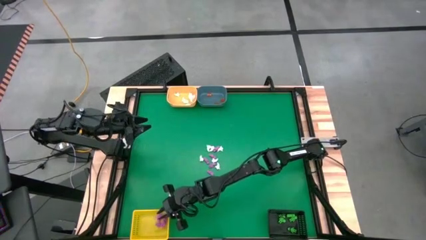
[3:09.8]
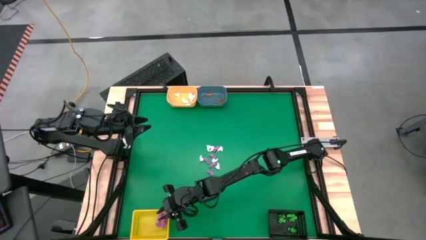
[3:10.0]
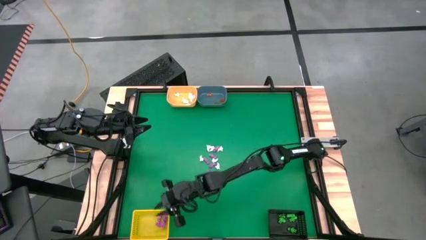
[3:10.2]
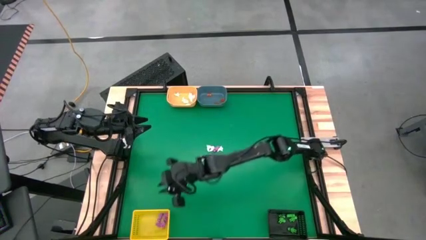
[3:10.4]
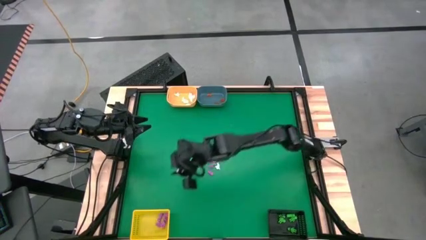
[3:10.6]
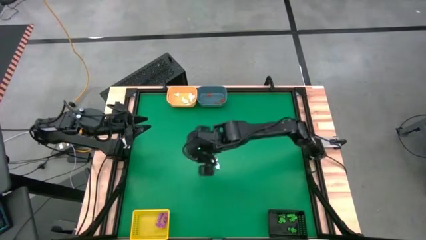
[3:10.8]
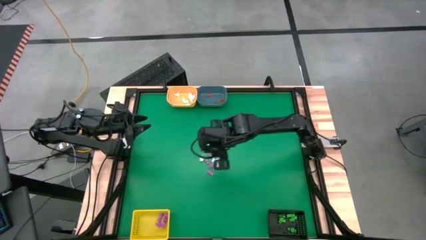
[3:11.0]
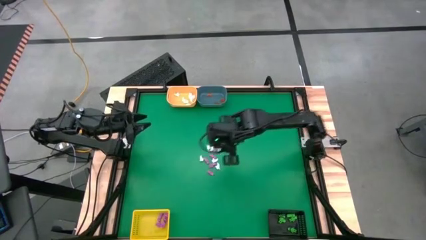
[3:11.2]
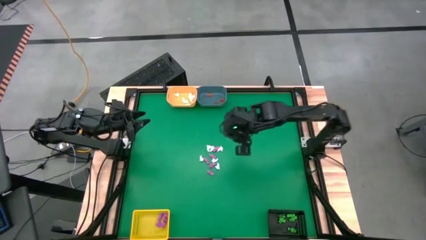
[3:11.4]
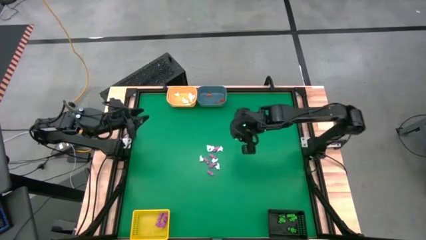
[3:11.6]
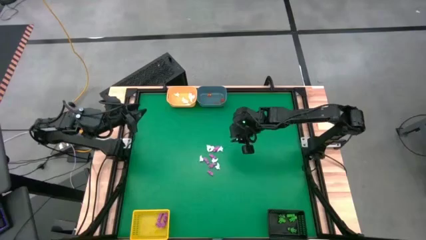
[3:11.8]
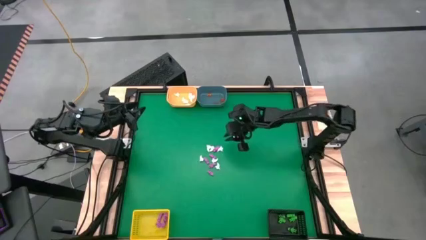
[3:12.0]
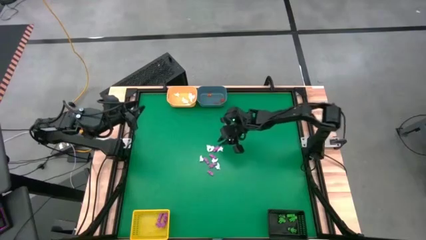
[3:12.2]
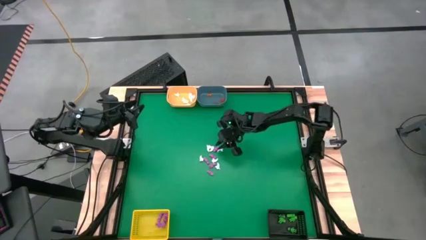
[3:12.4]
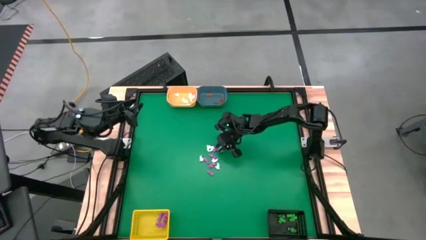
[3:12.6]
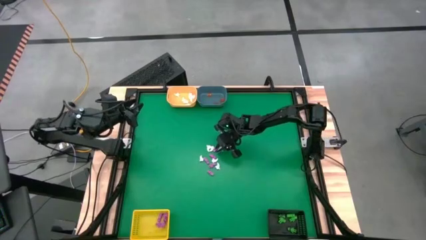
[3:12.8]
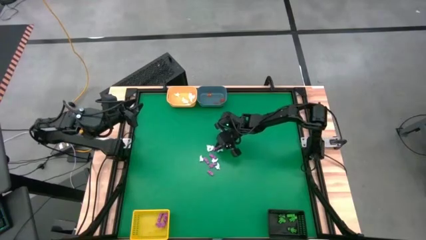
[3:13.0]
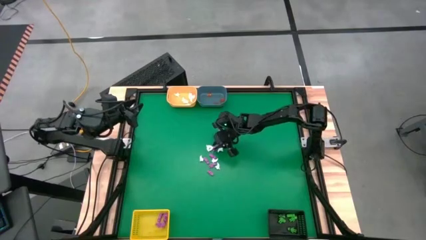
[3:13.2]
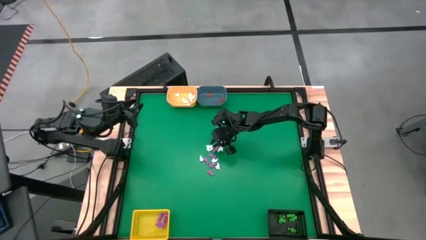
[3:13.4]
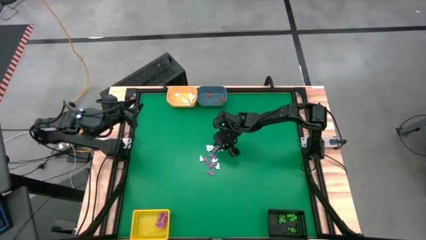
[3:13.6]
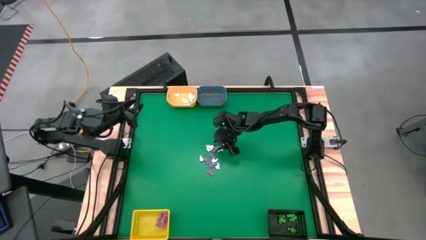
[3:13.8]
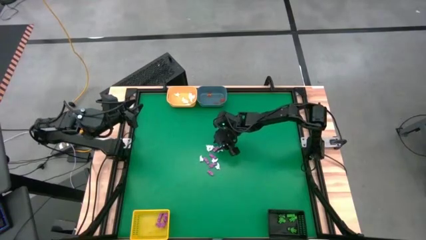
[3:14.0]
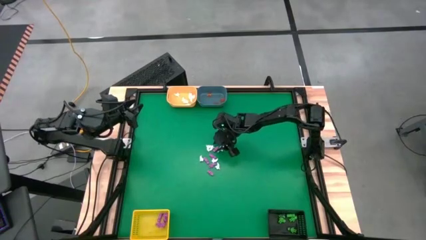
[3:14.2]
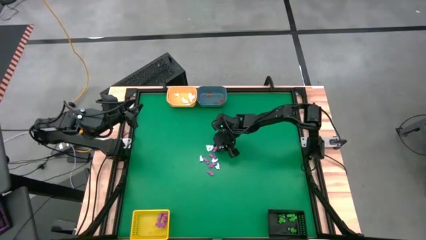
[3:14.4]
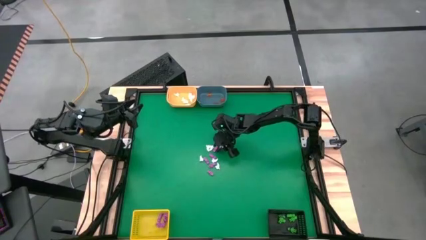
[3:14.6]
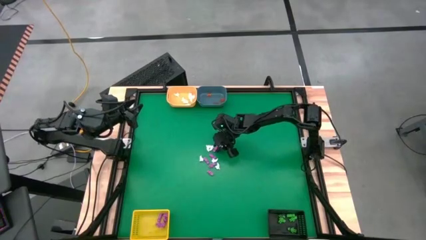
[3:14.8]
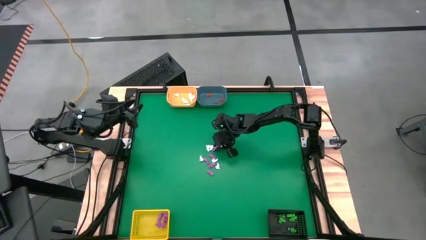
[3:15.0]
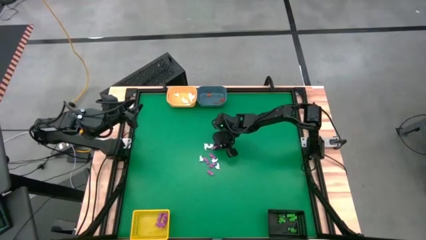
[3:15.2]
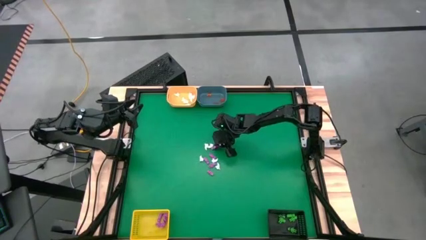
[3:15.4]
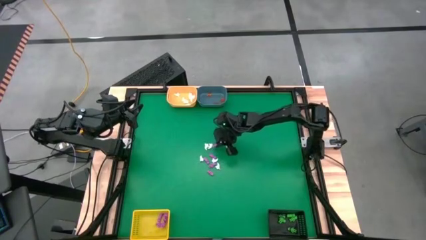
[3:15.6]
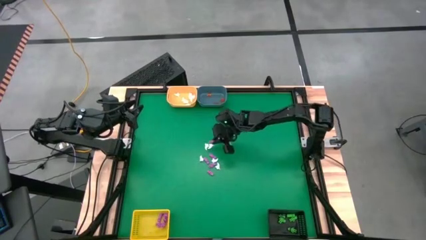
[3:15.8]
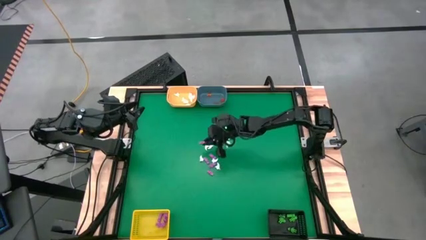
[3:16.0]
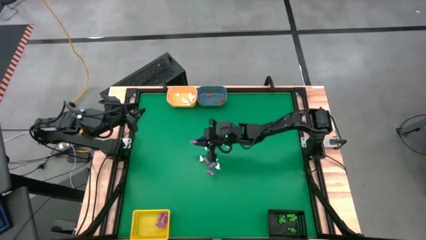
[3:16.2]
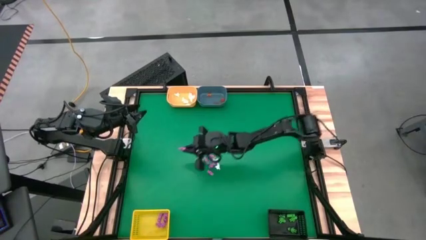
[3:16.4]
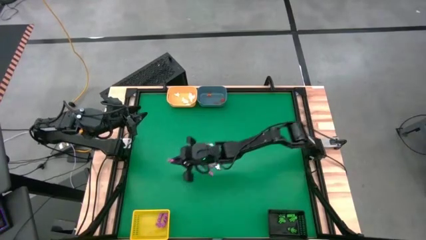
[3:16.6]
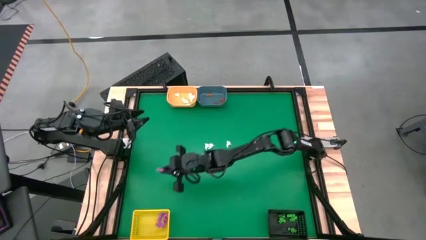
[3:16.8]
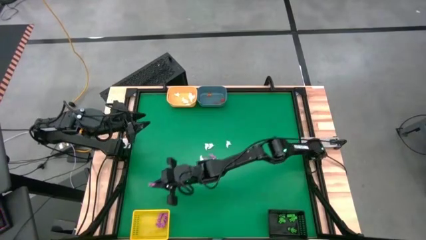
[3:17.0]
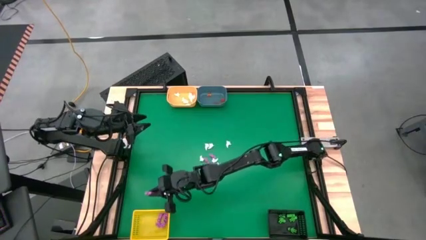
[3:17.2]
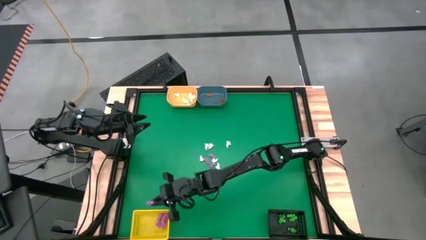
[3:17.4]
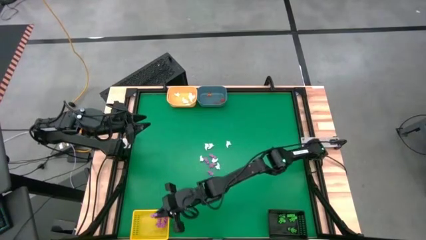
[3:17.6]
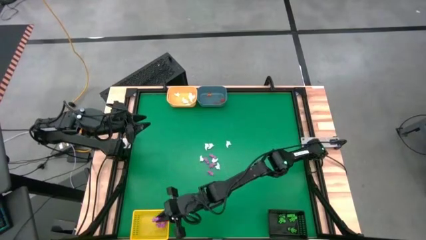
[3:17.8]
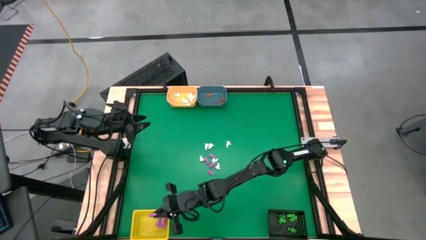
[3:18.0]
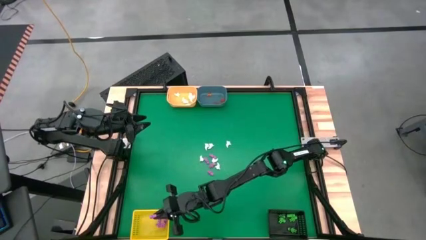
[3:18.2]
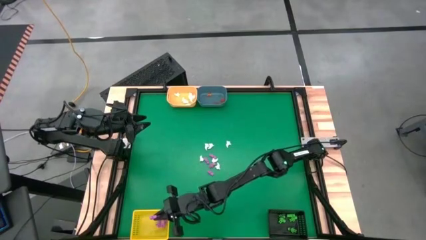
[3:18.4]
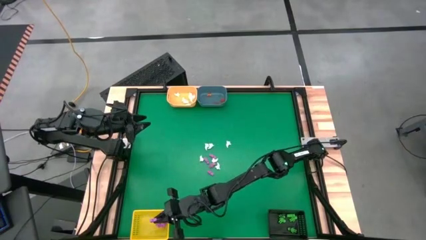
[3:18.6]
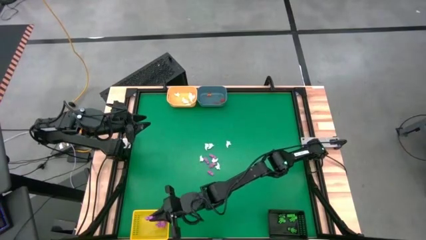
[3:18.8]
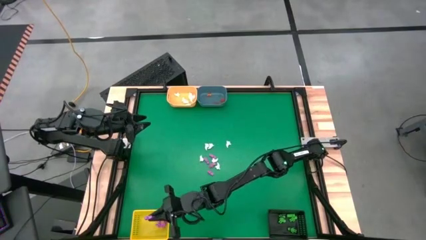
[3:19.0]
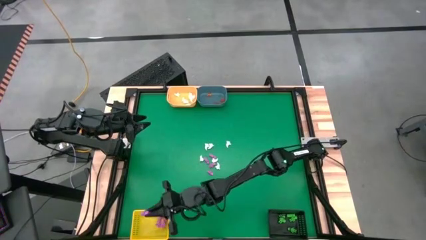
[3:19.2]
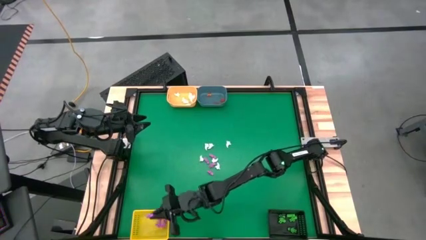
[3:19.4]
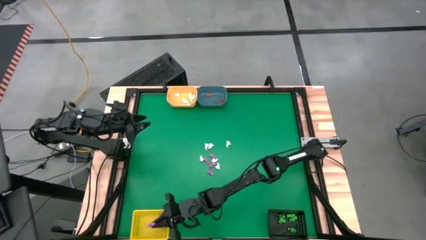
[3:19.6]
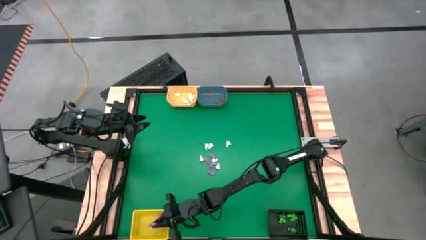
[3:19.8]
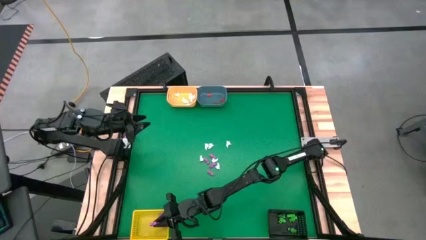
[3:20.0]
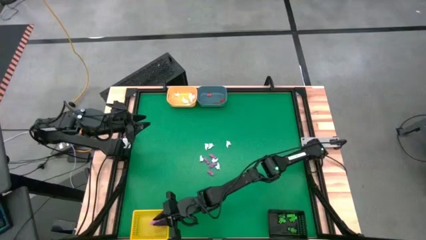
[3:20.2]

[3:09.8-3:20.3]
Task: Sort Halloween decoration
Put the pink skeleton into the yellow bin

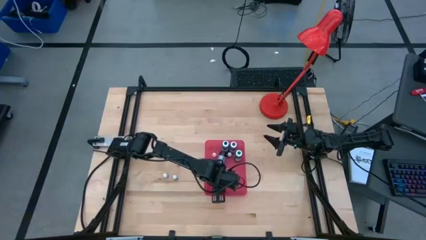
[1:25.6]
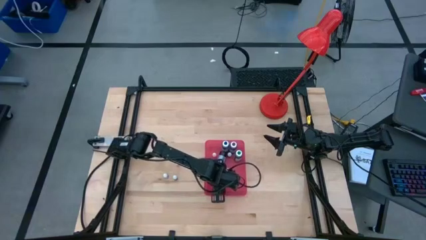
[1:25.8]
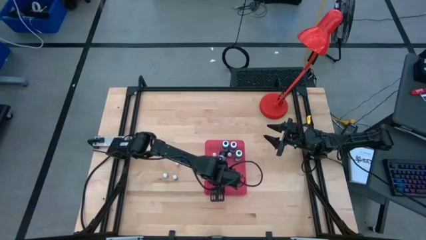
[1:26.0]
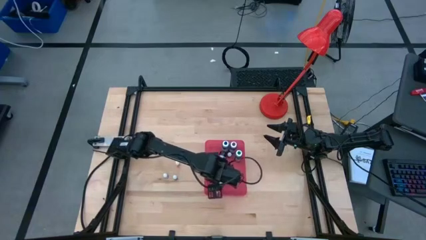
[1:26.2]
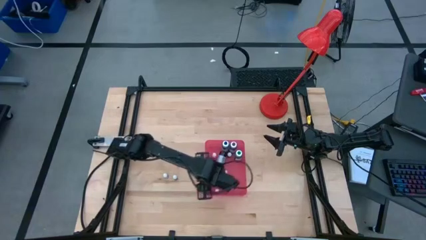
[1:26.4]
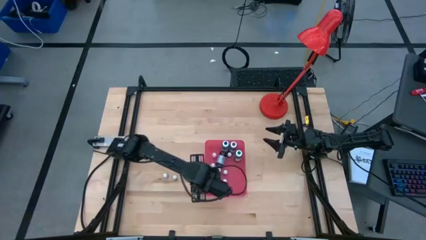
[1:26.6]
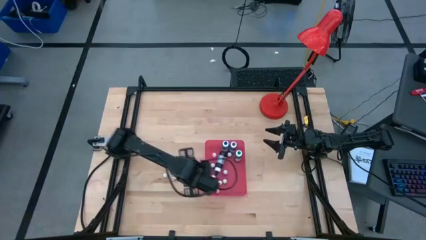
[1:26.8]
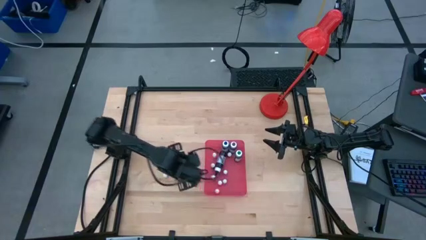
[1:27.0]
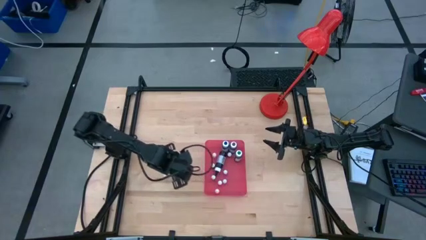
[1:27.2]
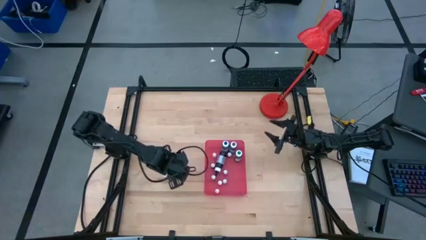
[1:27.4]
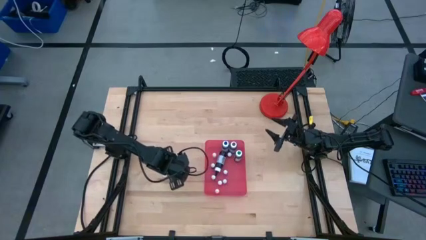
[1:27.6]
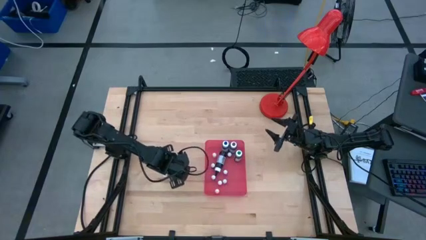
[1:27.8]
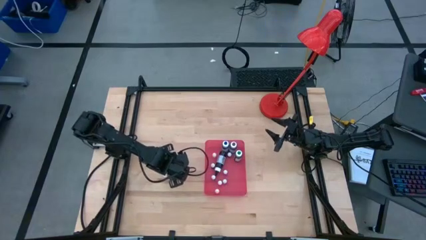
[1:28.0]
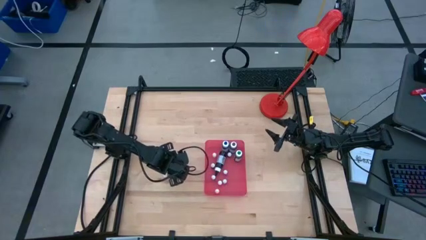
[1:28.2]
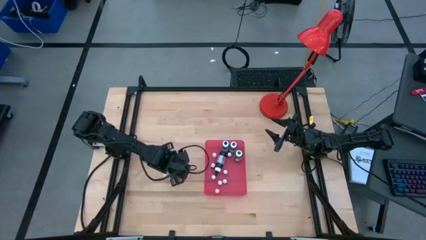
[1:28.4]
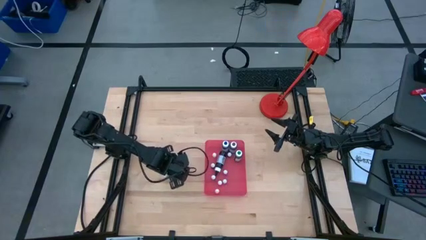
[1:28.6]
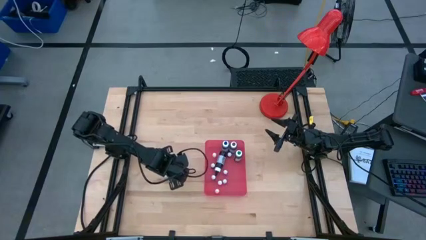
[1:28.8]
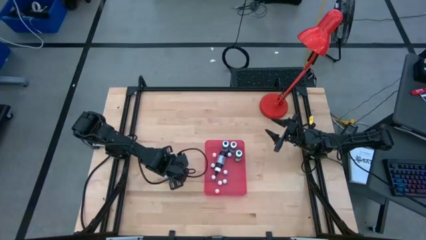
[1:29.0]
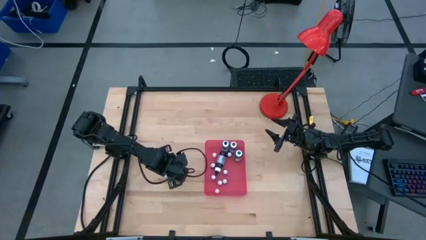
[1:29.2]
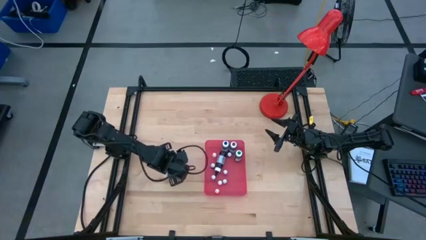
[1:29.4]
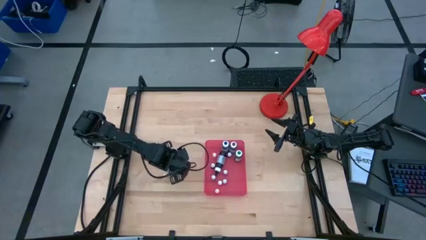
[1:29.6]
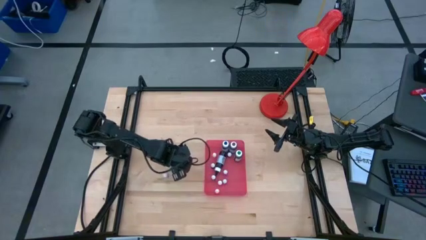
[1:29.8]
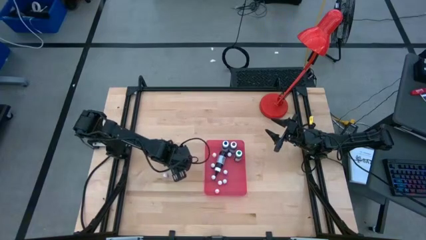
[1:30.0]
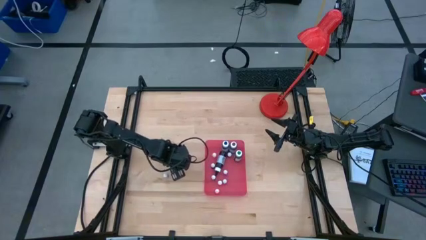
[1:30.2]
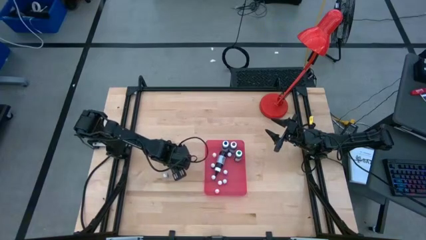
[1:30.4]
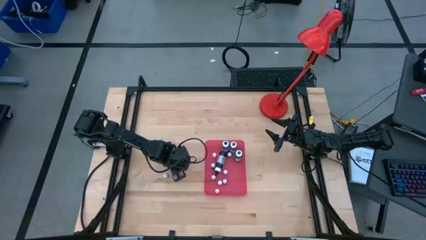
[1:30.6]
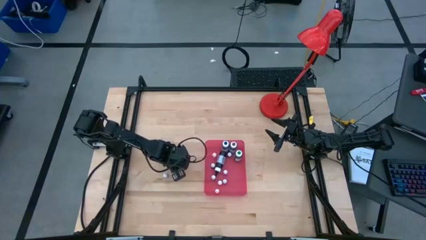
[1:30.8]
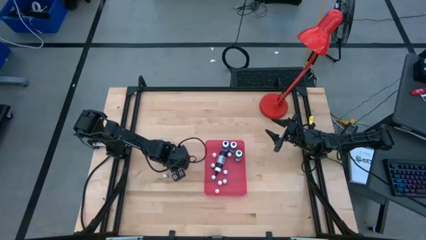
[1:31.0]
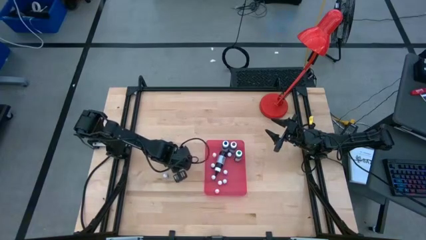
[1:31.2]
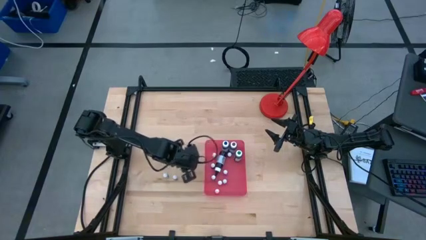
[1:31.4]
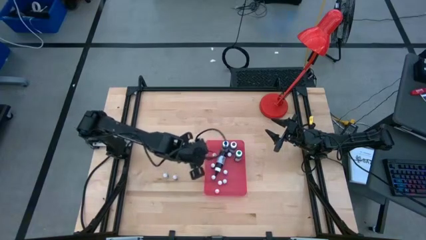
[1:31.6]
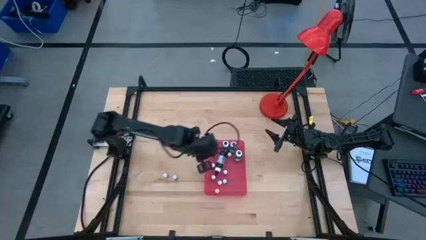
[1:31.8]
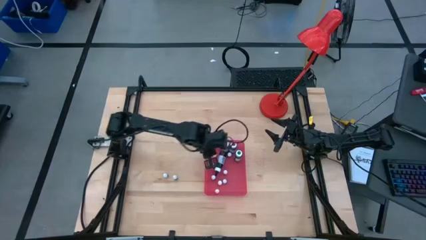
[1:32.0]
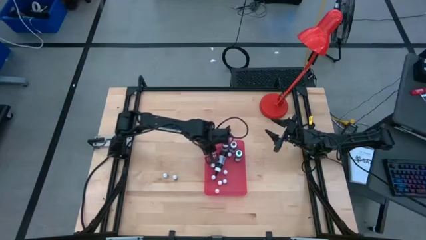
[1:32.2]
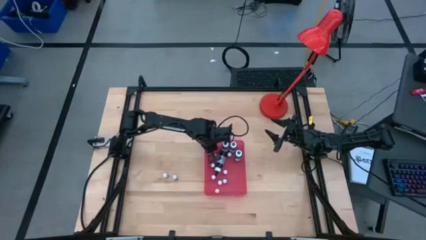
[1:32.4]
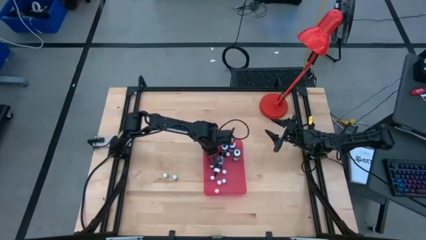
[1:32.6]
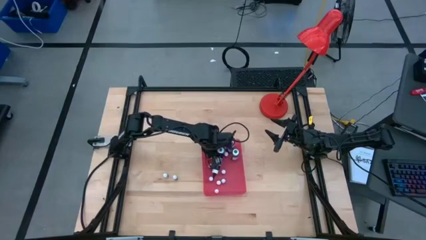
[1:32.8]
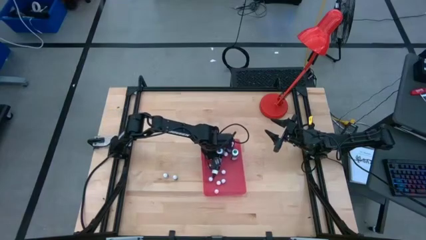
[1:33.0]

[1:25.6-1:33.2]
Task: Pick & Place food coloring
Put the small orange food coloring bottle into the red bin
